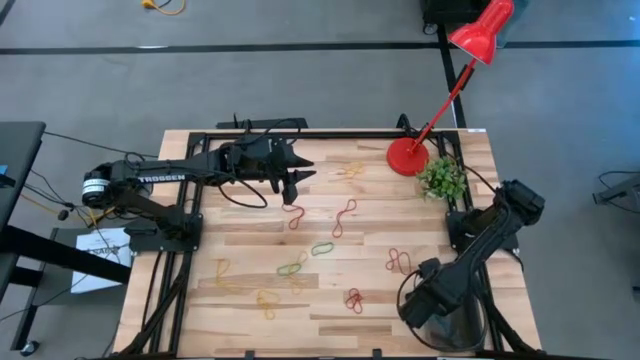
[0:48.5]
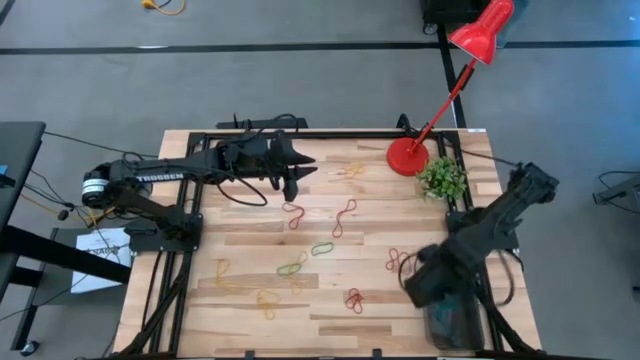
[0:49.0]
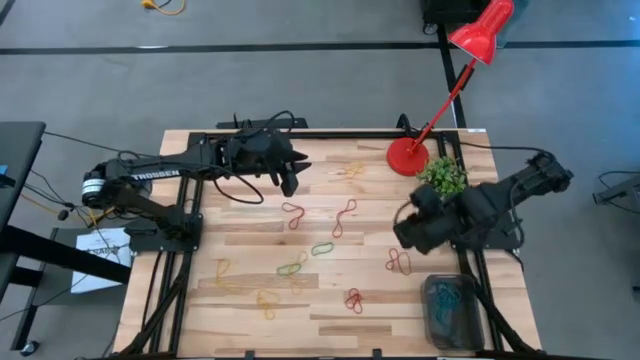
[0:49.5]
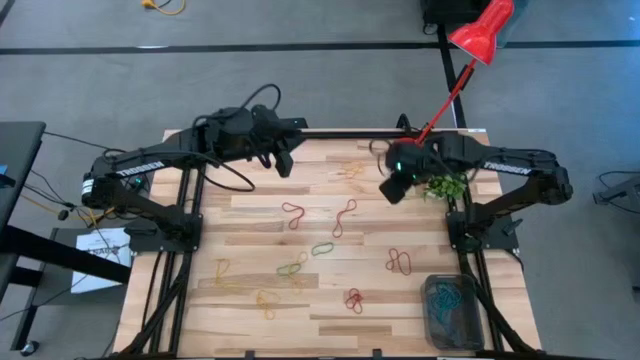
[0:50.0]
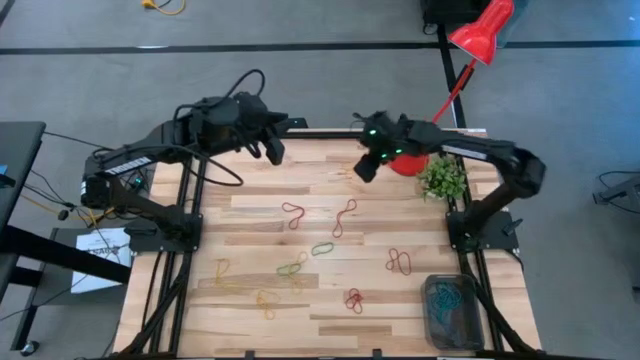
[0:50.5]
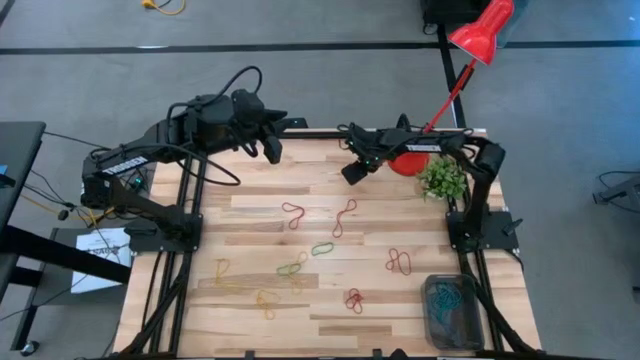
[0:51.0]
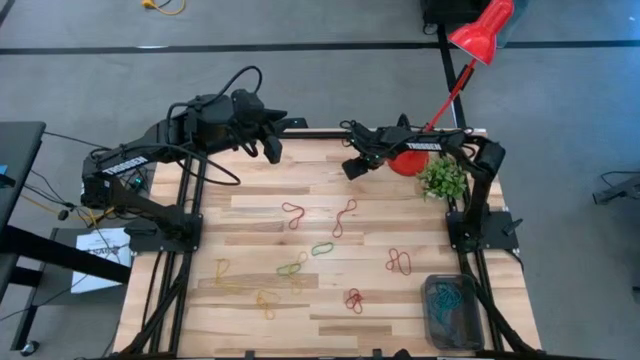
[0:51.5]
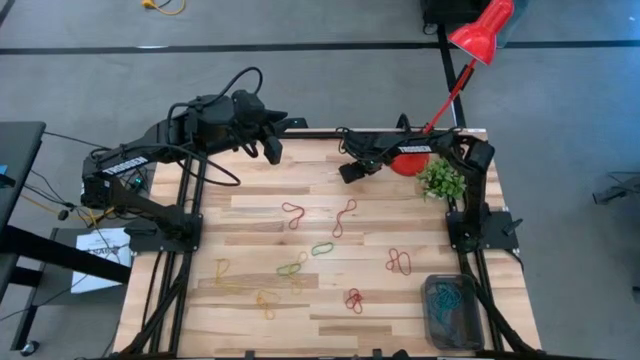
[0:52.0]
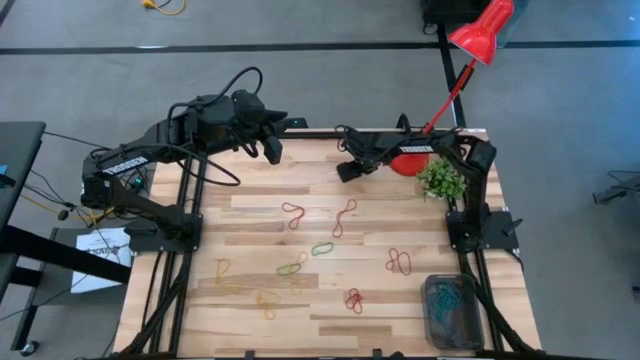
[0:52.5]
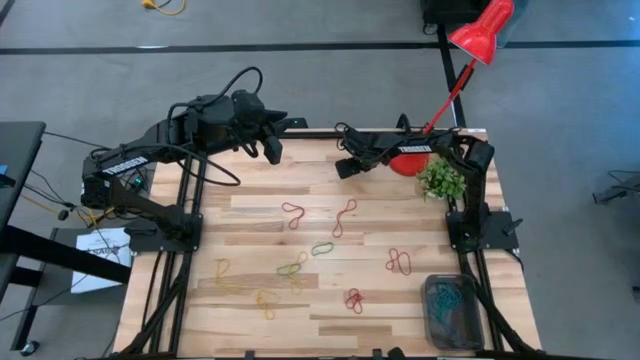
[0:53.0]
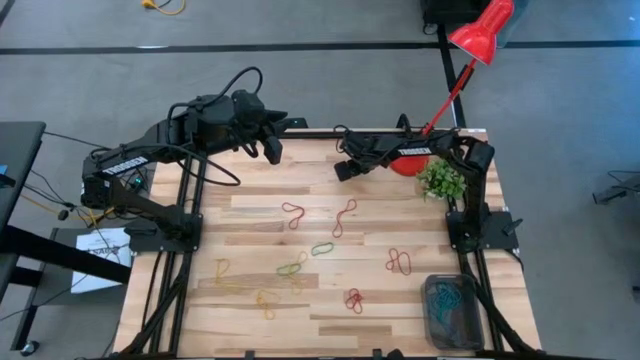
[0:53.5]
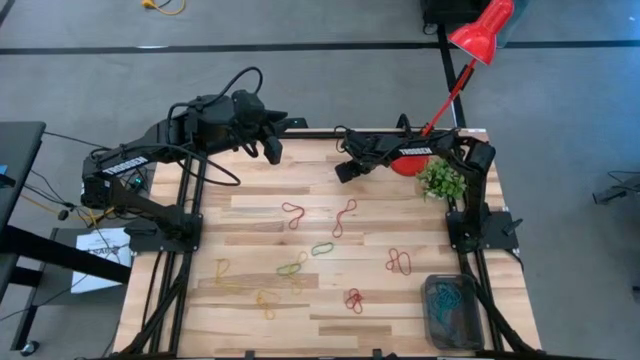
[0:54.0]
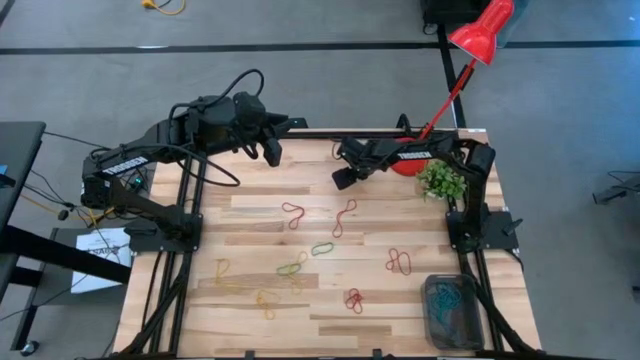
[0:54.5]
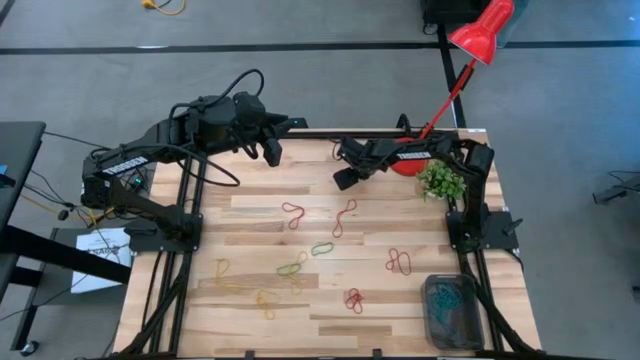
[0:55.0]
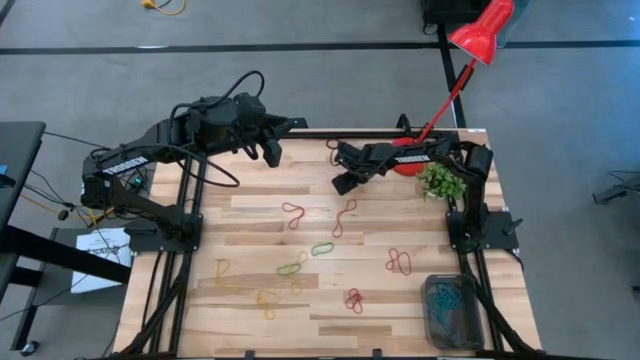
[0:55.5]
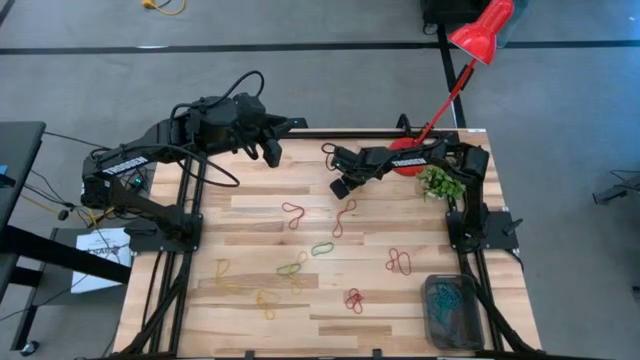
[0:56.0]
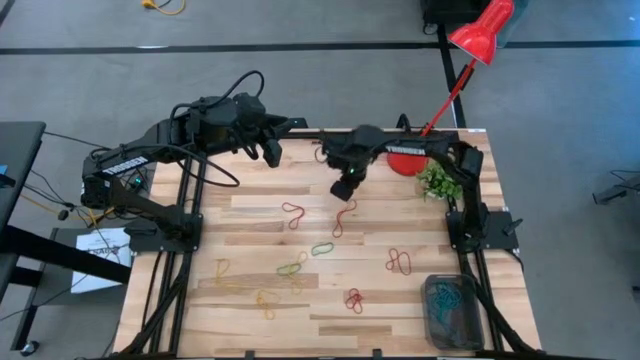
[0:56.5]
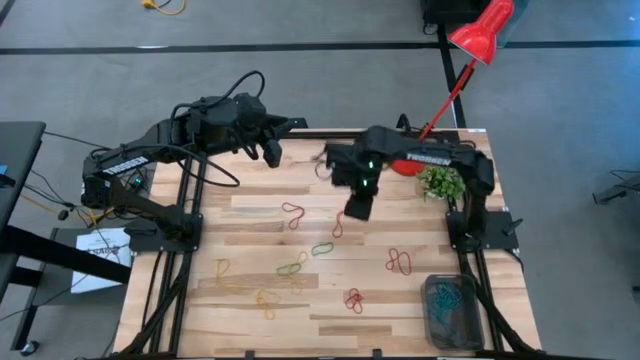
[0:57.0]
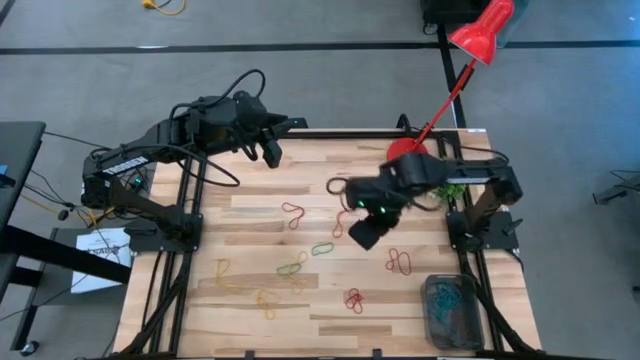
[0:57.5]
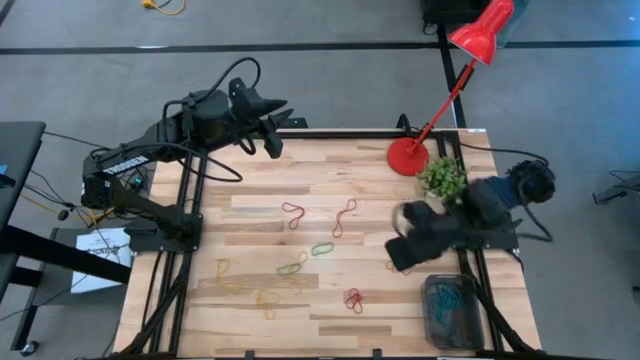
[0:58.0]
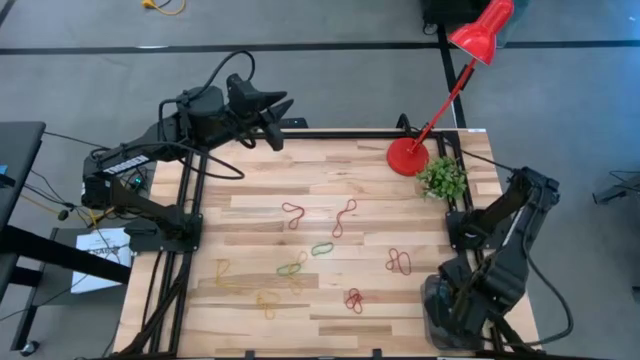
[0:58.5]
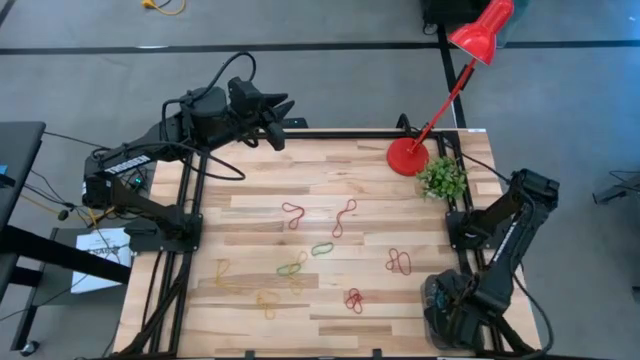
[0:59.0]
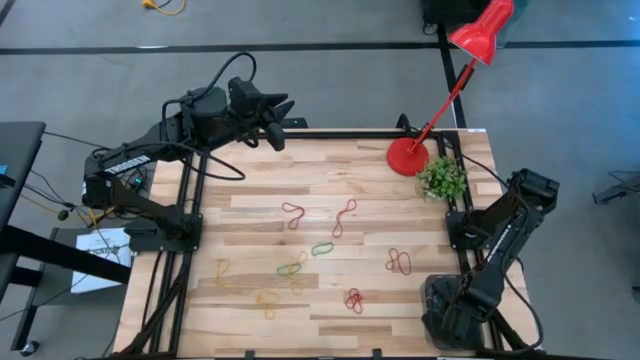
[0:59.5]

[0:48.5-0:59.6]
Task: Pick and place items into bin
Put the yellow rubber band into the black bin

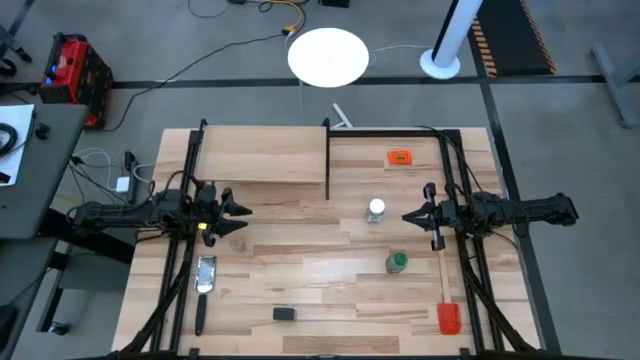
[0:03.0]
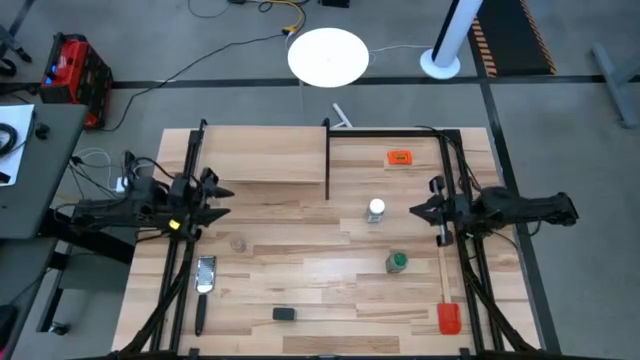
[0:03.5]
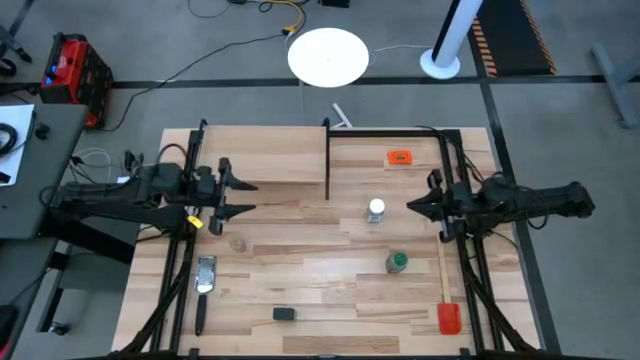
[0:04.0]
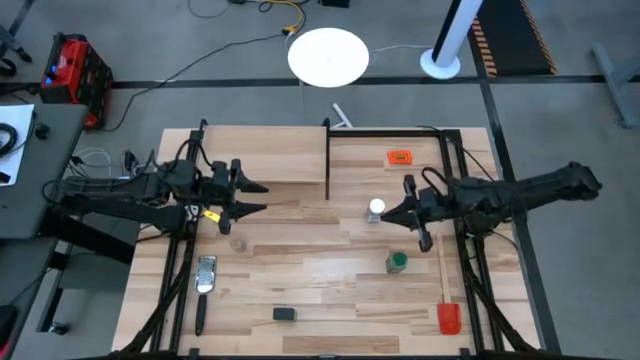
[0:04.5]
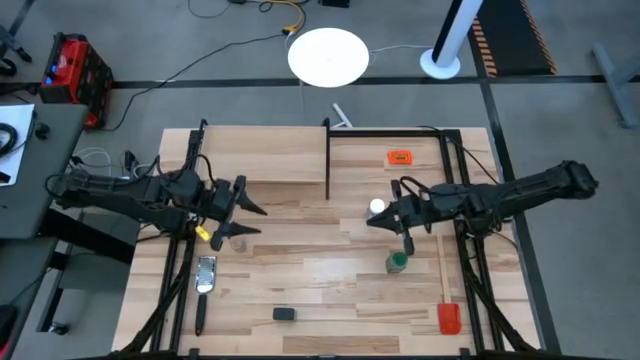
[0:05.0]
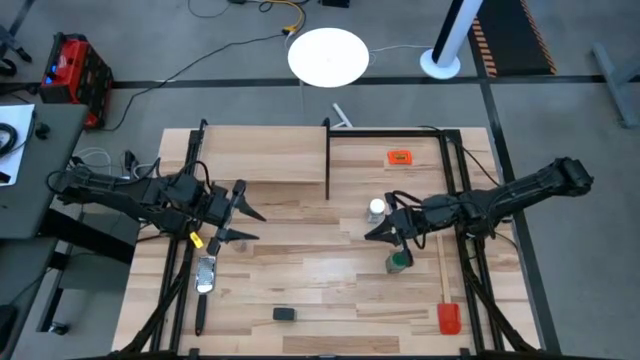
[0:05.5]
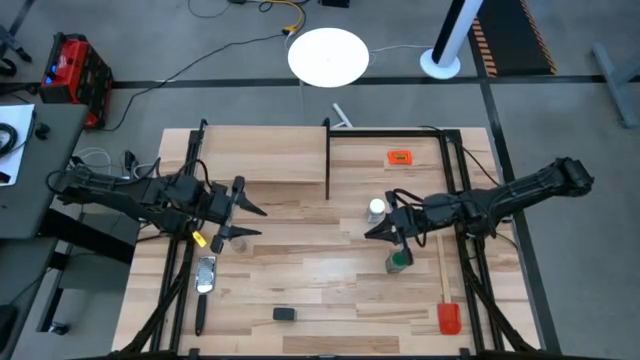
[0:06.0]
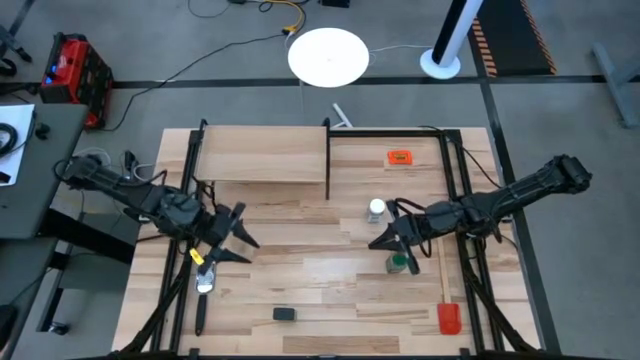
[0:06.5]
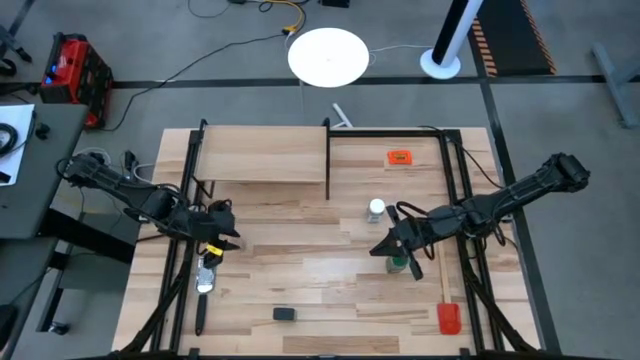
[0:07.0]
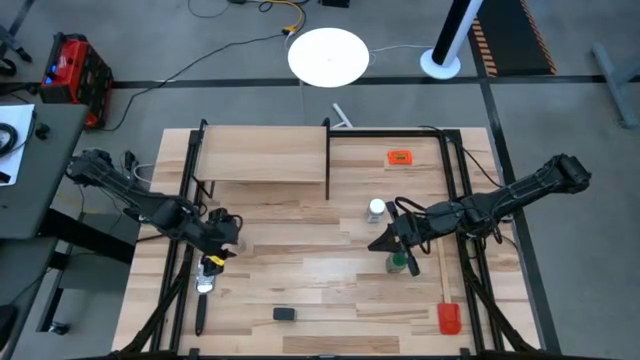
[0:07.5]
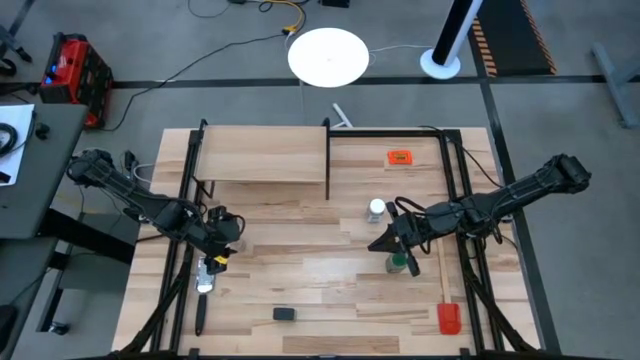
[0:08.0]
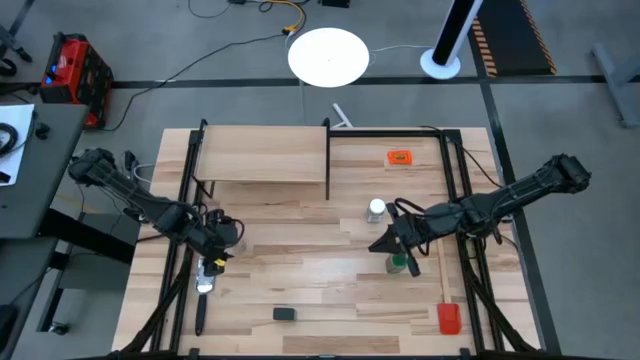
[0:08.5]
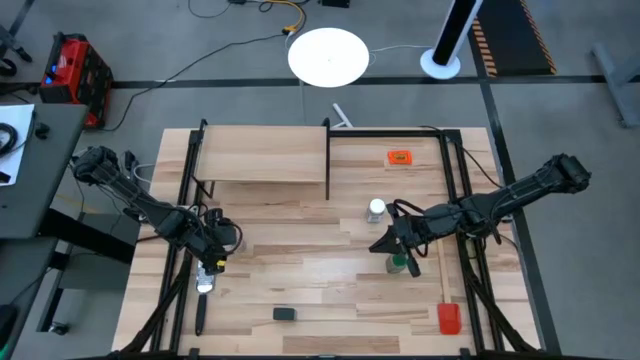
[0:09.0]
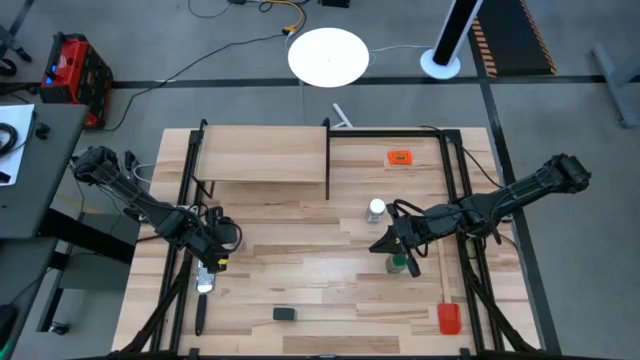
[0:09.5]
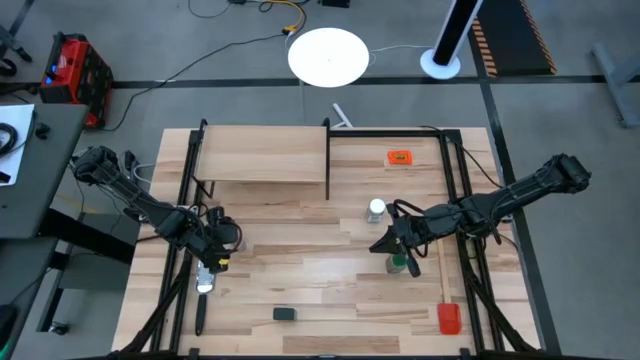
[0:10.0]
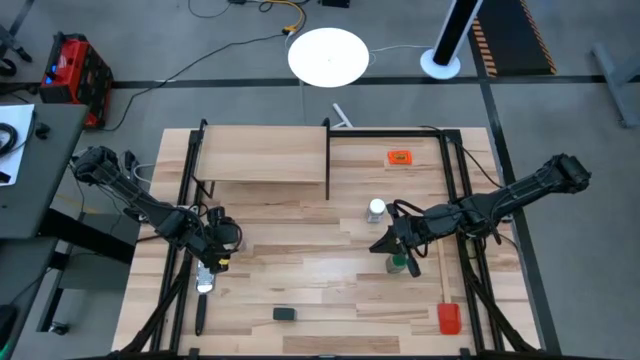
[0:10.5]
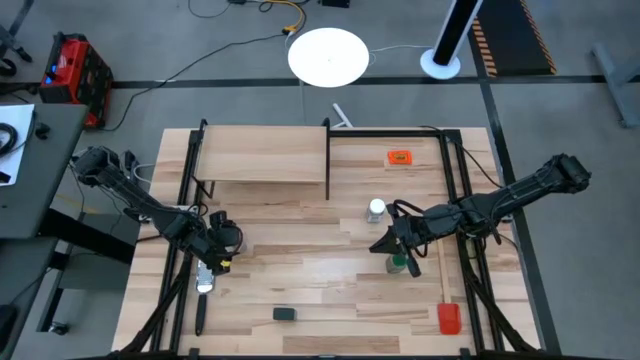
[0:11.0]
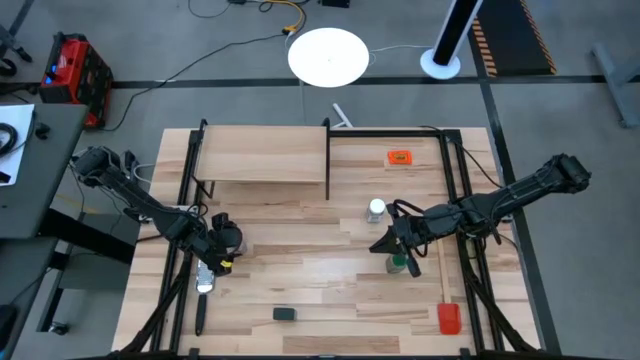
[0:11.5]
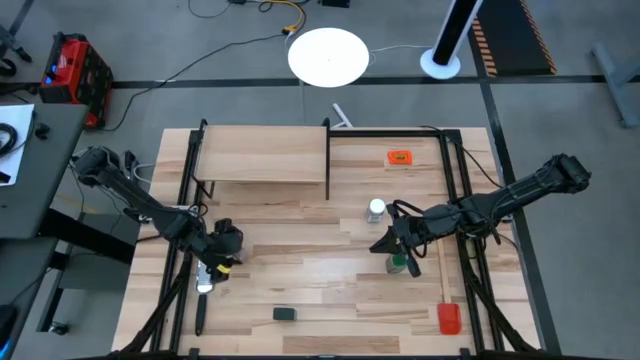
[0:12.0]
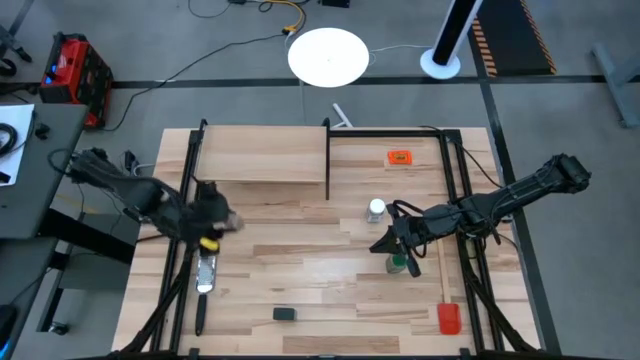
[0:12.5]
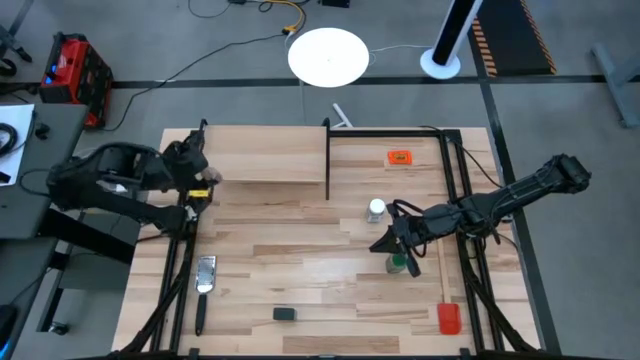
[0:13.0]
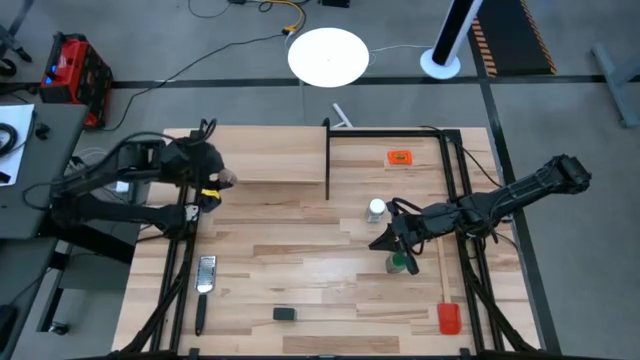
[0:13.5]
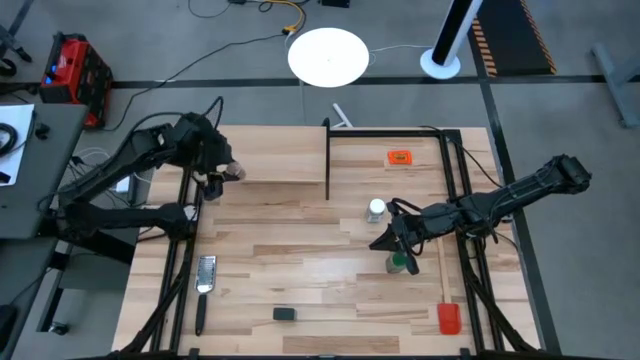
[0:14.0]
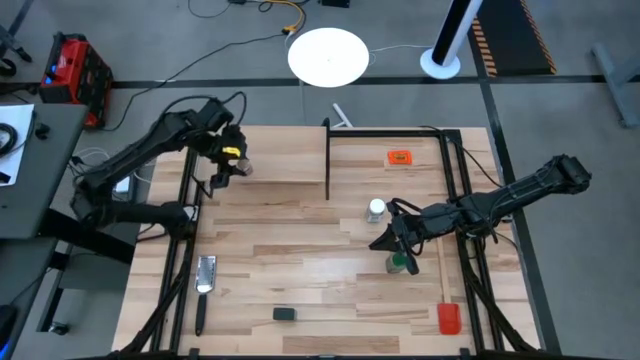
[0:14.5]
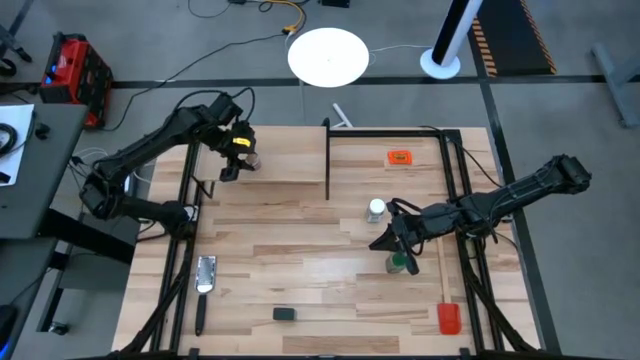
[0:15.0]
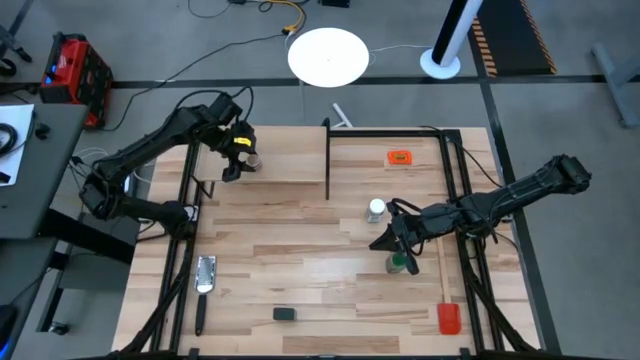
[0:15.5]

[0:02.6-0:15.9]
Task: Shelf spices
Put the brown seasoning bottle on the shelf
